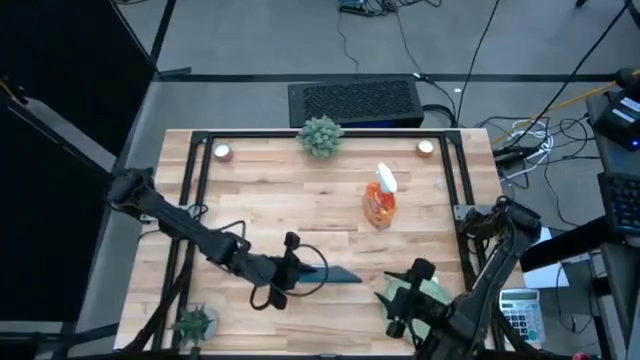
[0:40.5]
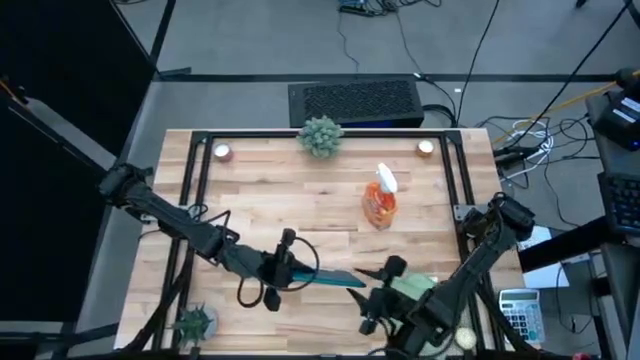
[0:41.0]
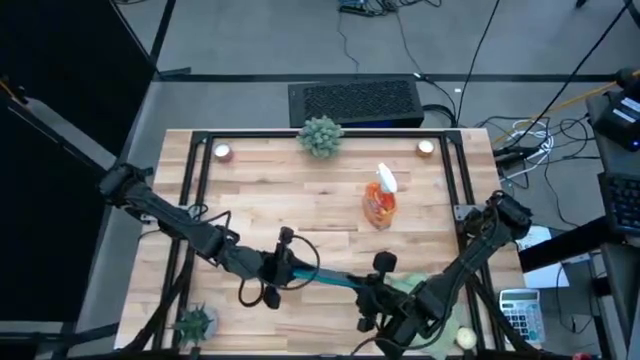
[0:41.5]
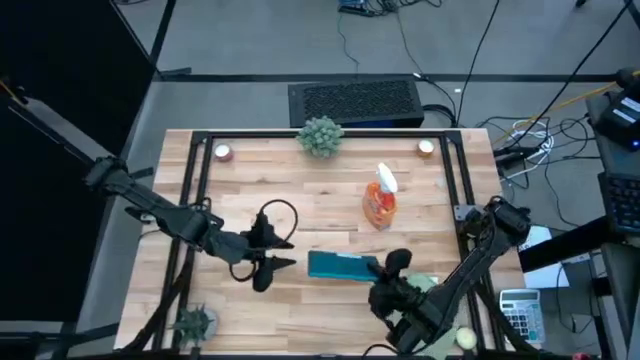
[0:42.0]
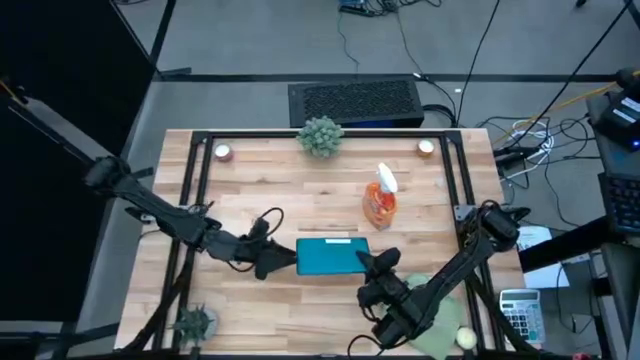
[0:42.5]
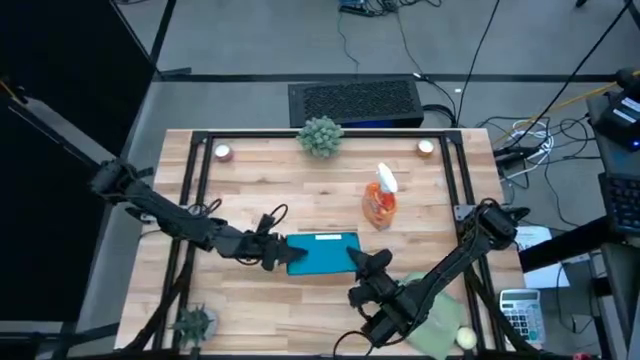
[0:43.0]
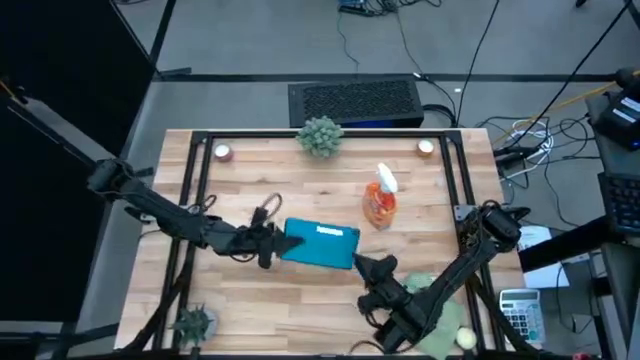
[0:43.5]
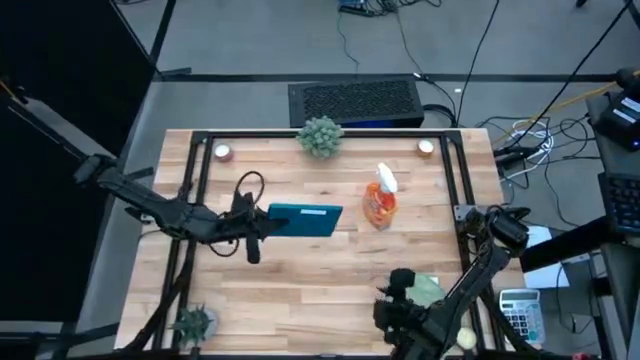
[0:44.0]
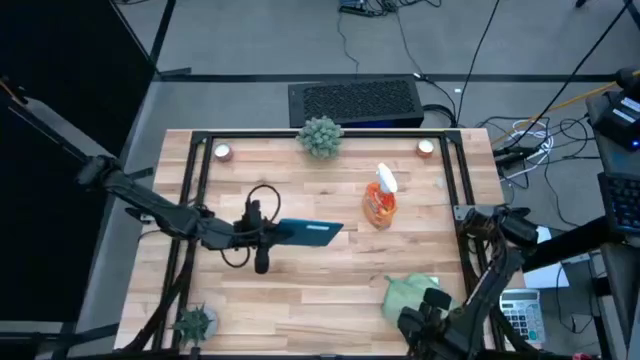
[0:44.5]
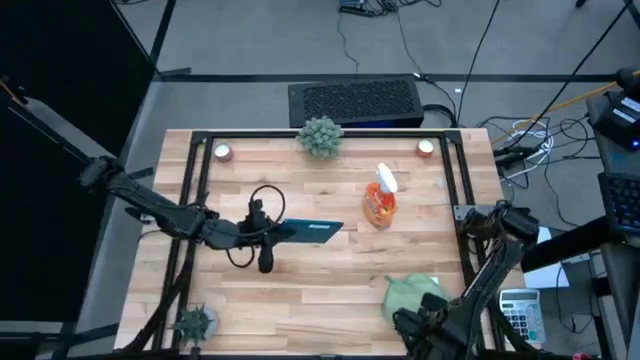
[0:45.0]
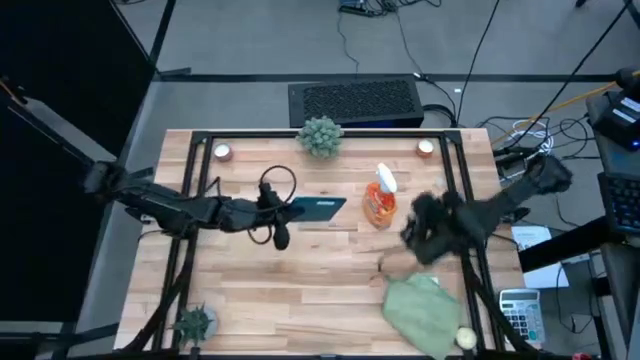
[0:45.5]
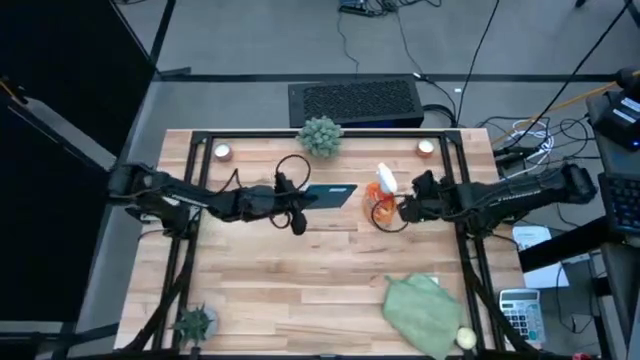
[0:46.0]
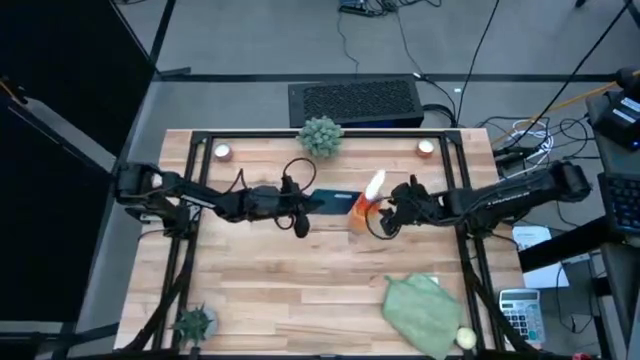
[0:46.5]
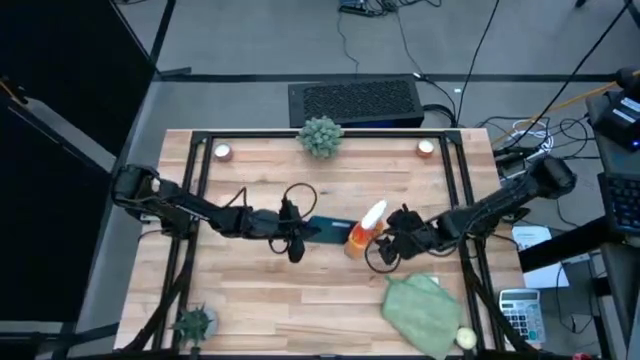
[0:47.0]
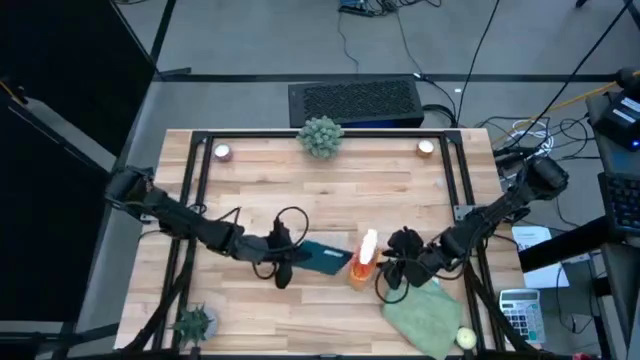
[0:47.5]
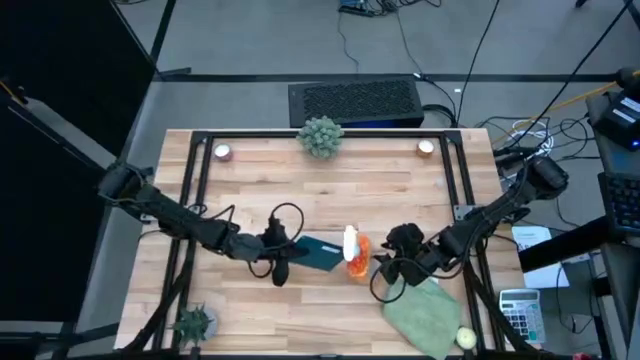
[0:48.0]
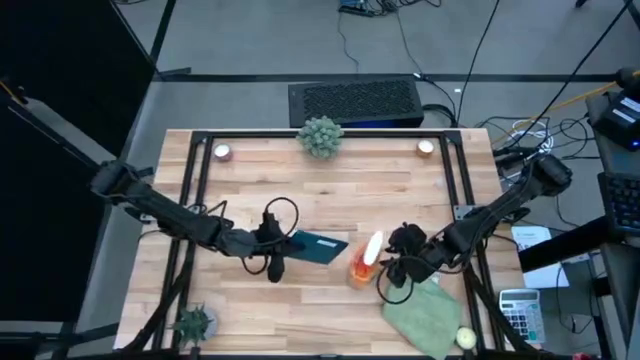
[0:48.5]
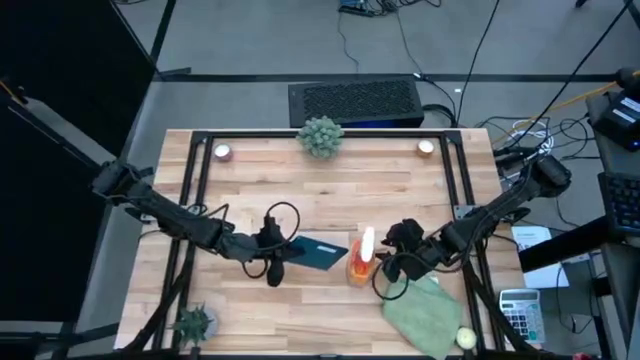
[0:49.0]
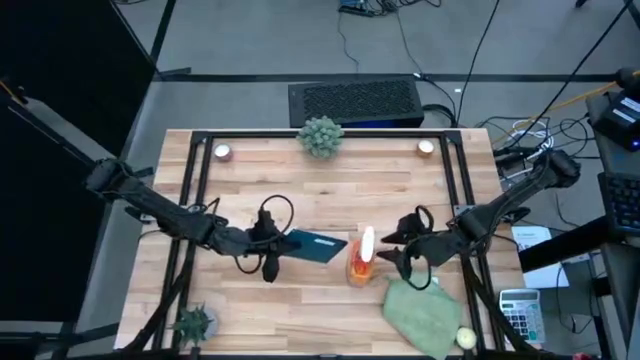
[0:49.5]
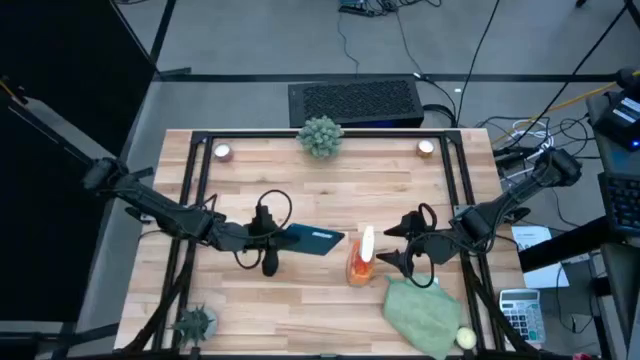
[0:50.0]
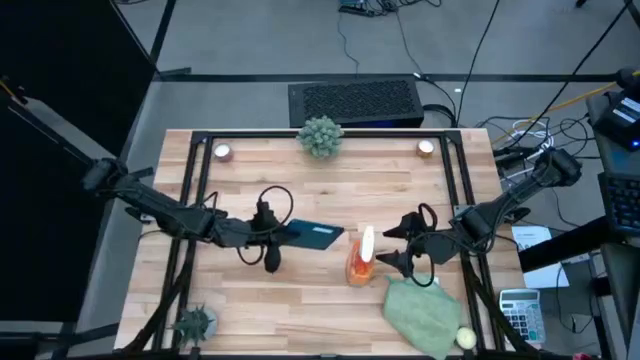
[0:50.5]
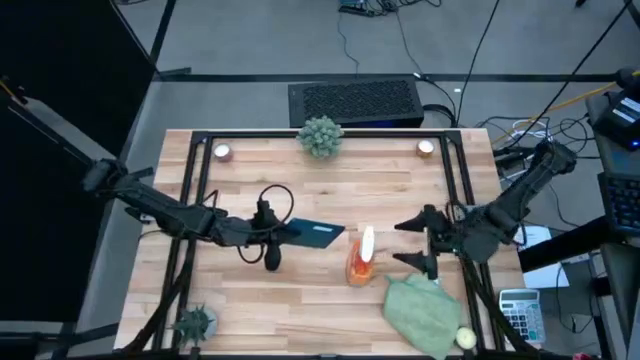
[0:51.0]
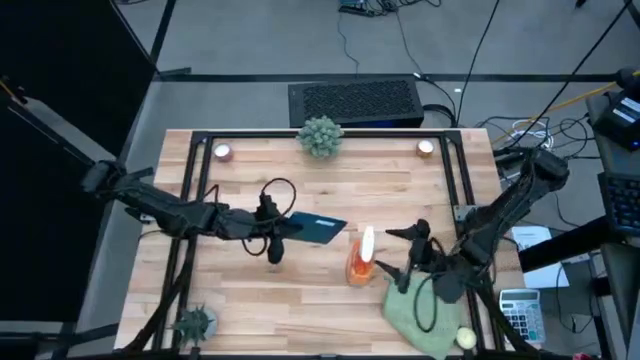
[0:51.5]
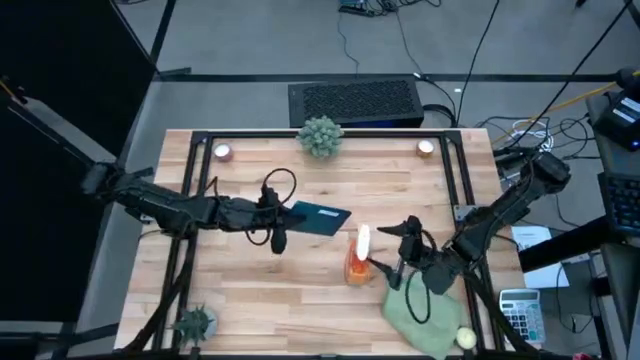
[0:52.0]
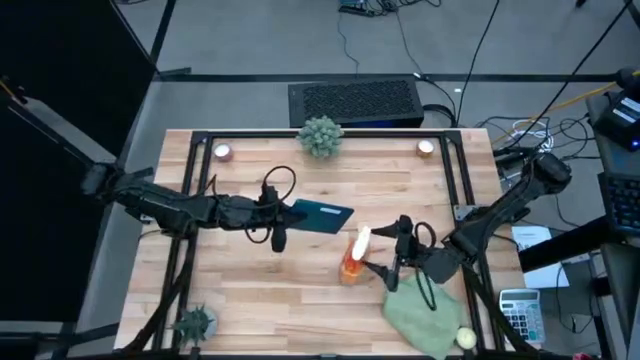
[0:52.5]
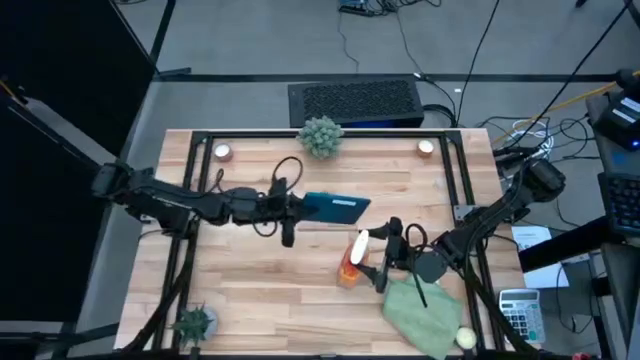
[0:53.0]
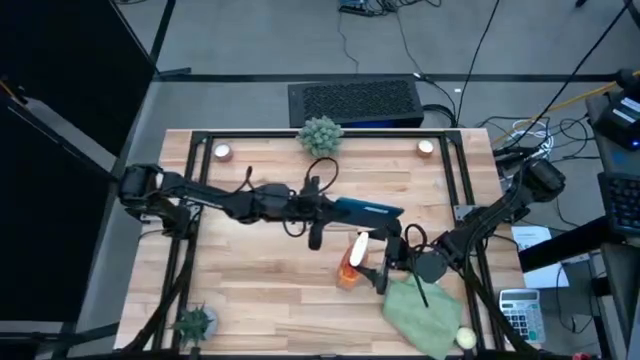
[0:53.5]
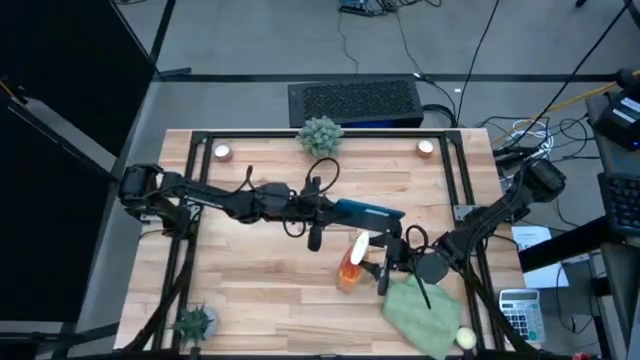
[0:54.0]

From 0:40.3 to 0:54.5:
Task: Apply microfiber cloth
Spray the cellphone using the spray bottle
